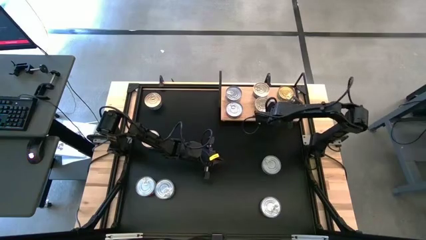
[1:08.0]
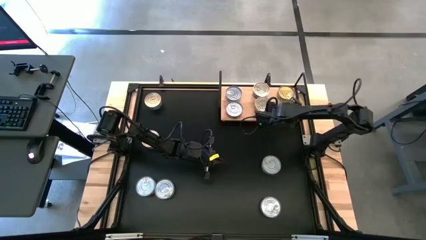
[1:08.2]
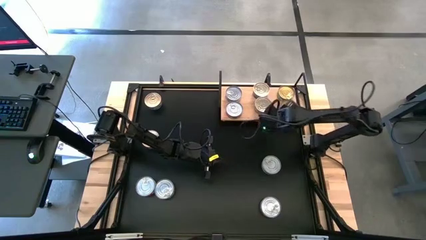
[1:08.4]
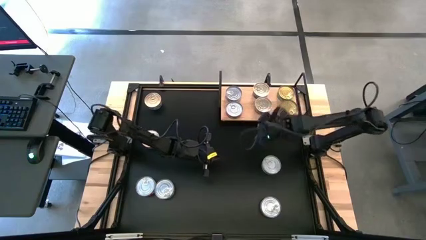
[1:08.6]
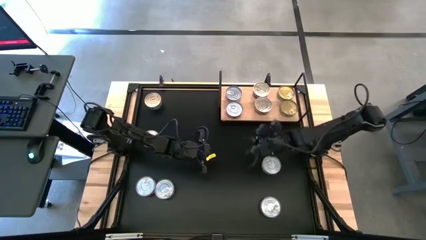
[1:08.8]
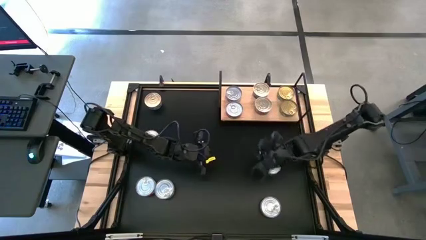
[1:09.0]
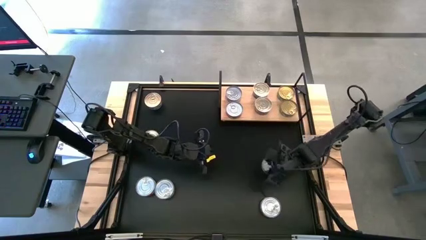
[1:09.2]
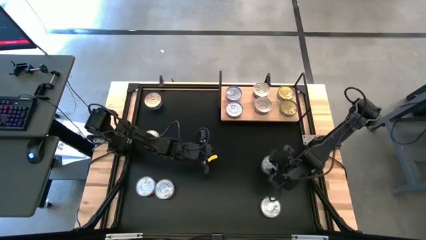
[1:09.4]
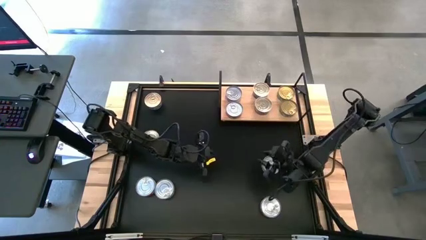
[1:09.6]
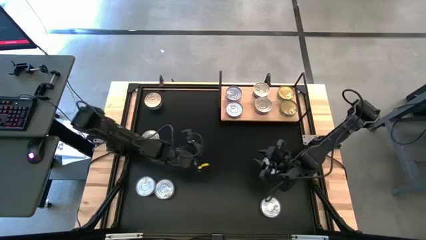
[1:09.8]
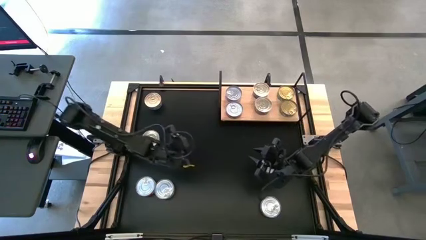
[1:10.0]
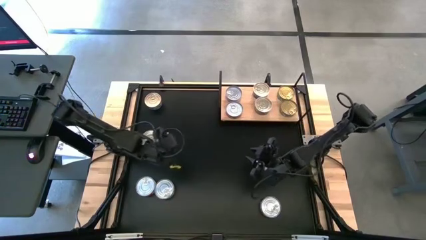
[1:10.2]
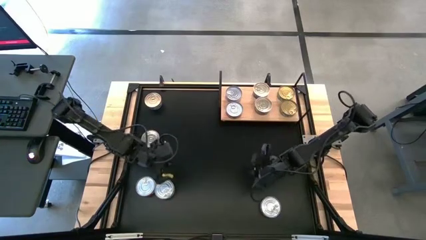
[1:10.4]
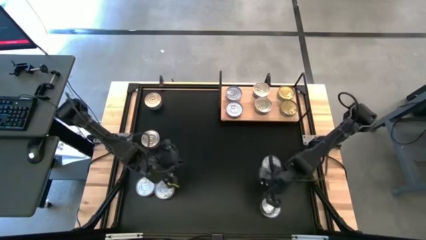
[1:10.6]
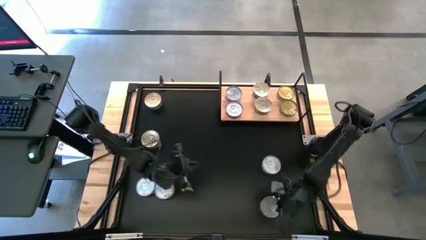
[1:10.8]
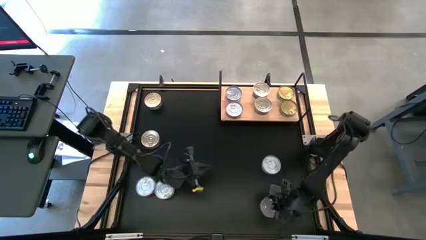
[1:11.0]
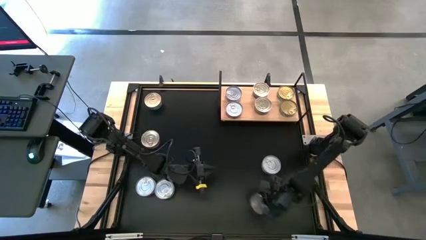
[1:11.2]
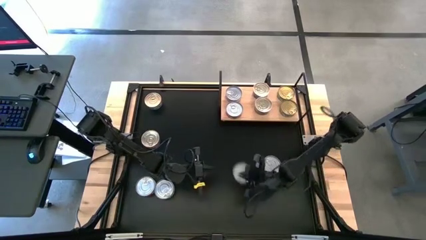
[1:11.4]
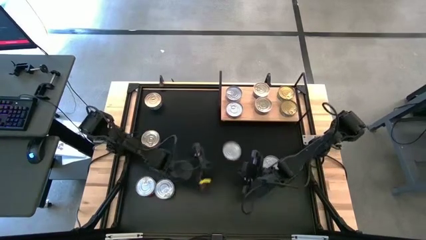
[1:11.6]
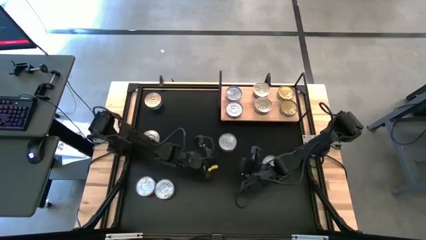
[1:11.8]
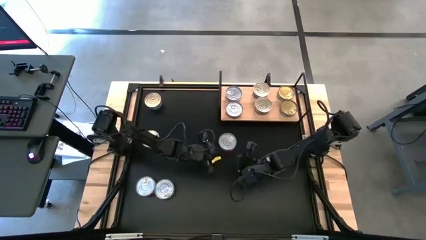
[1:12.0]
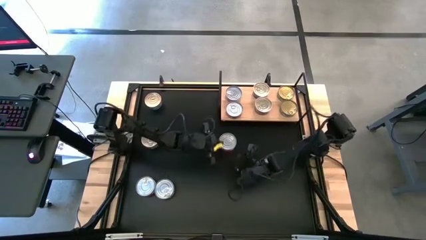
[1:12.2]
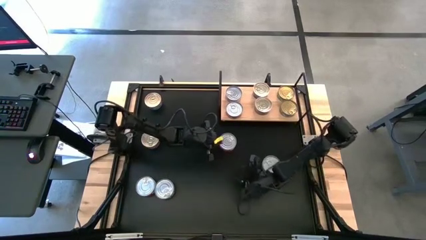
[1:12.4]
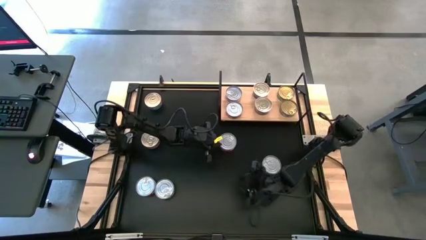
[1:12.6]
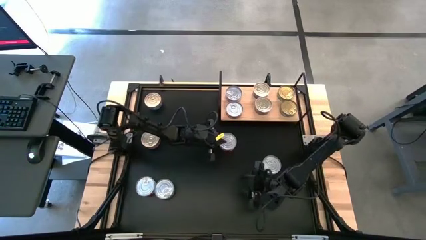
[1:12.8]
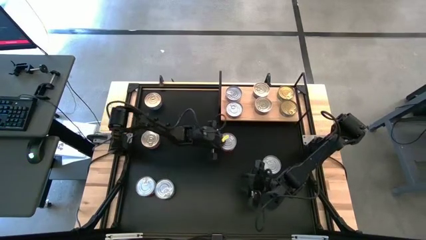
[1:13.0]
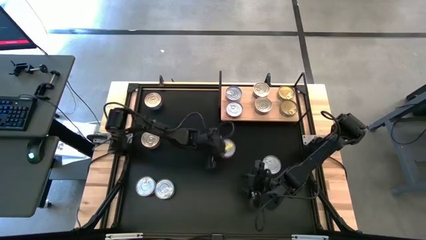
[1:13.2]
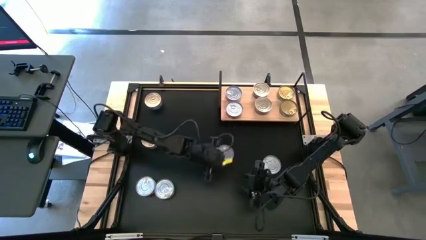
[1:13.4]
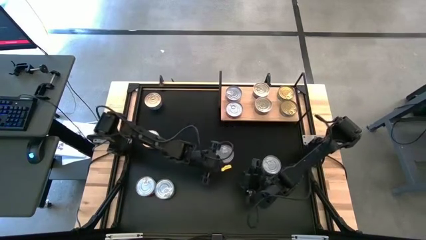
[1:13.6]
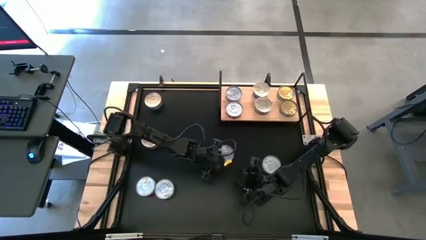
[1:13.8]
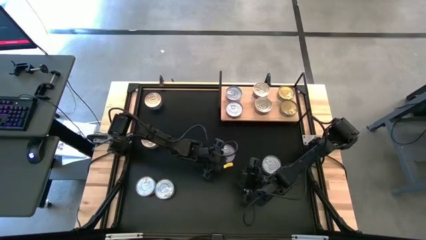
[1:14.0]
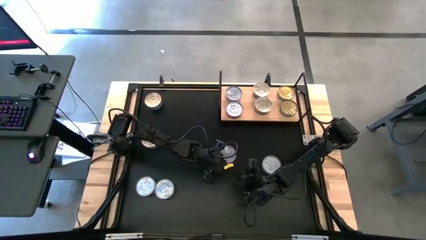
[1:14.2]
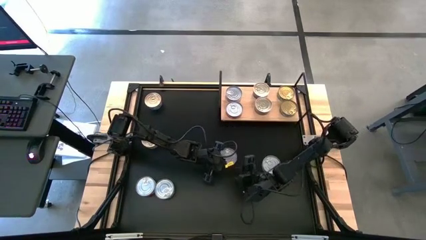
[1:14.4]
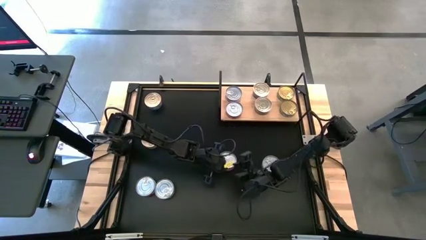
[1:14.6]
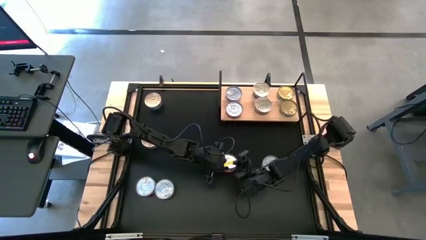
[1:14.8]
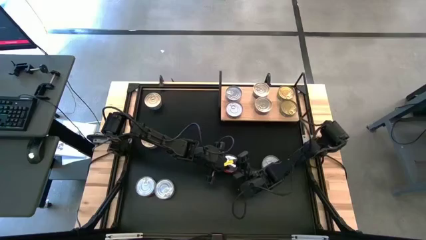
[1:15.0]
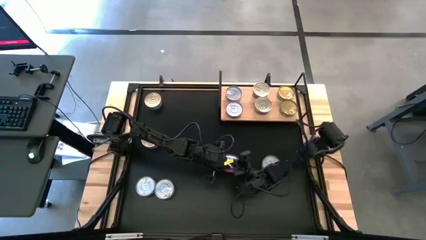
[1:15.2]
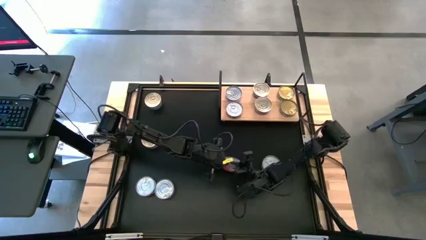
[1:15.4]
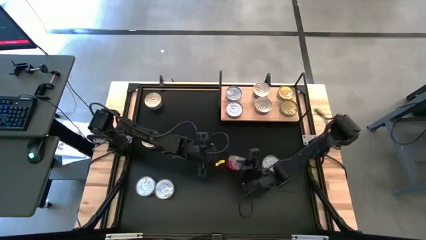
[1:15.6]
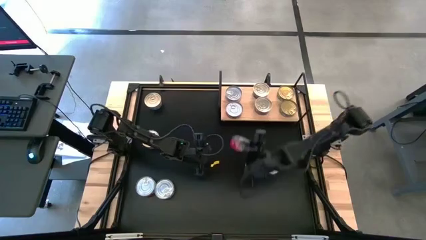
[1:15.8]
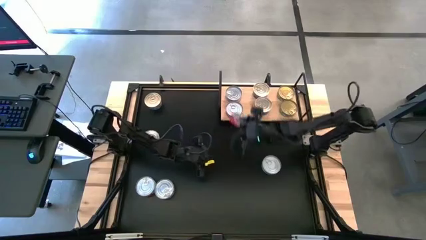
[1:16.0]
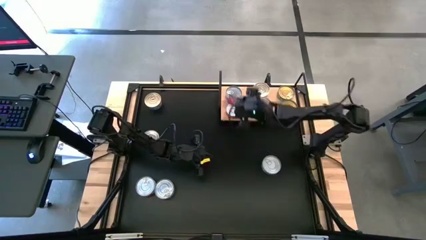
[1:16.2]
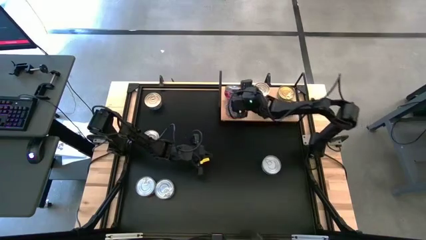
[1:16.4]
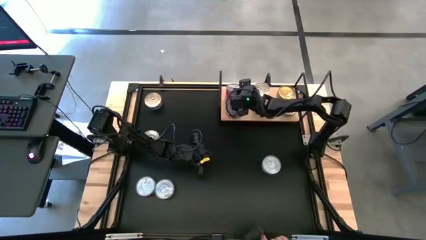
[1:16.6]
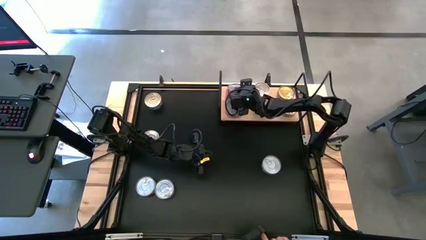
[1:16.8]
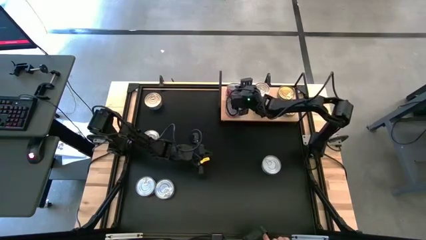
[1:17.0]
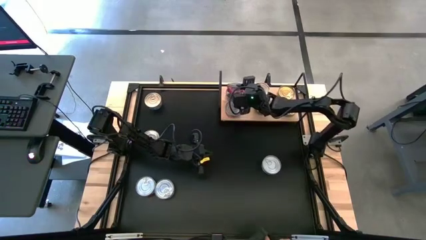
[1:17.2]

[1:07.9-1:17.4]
Task: Stack canned seafood by type on shelf
Stack the red tuna can on top of the other red tuna can on the shelf

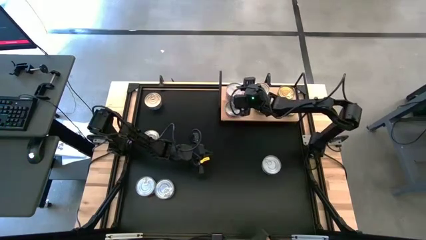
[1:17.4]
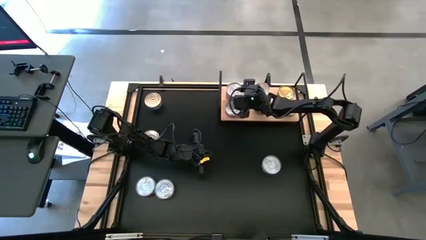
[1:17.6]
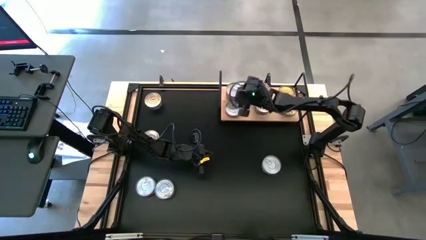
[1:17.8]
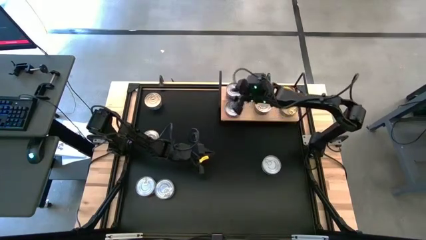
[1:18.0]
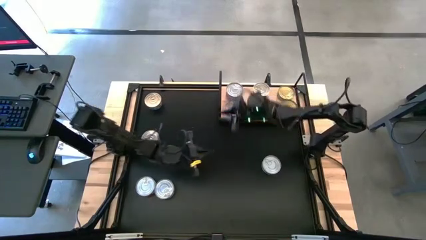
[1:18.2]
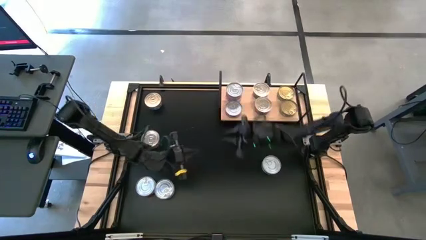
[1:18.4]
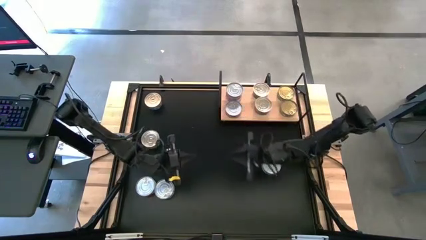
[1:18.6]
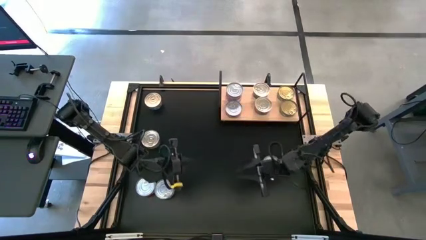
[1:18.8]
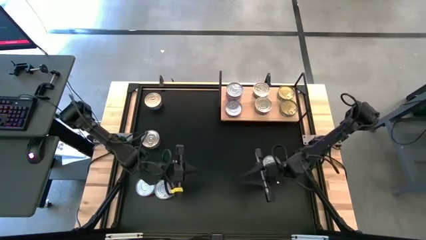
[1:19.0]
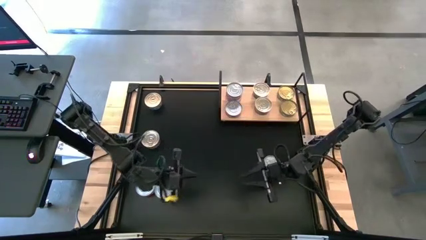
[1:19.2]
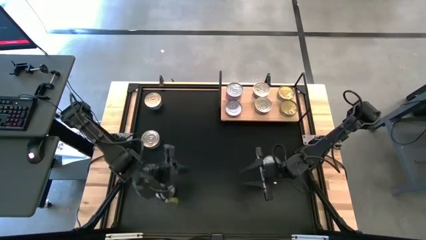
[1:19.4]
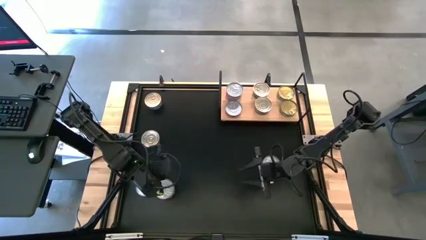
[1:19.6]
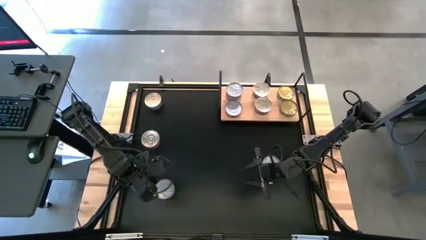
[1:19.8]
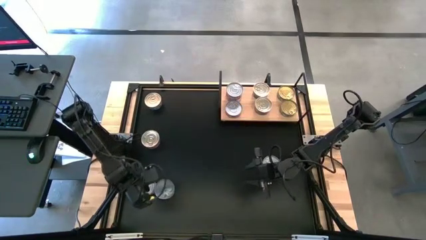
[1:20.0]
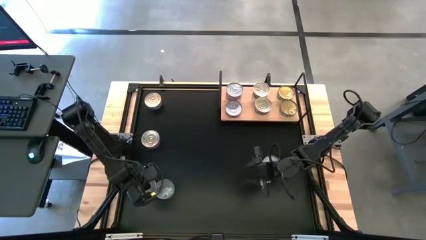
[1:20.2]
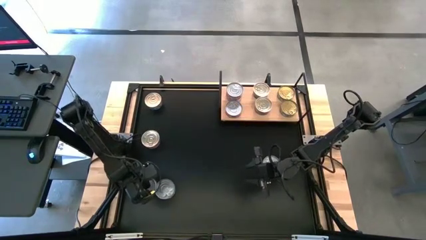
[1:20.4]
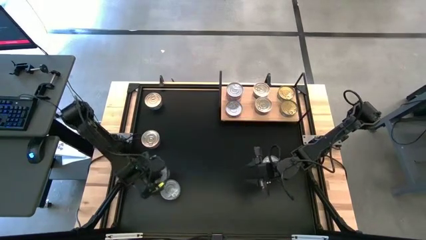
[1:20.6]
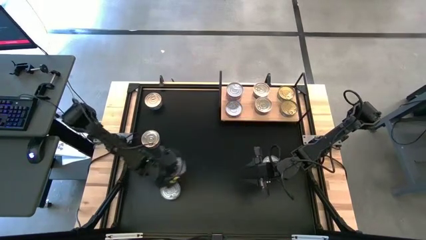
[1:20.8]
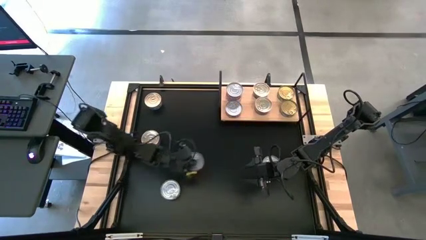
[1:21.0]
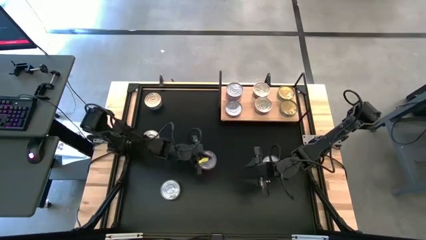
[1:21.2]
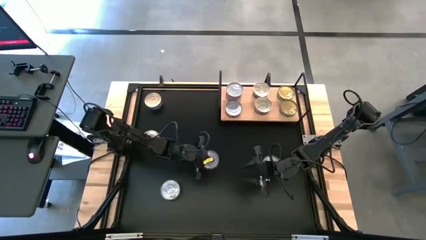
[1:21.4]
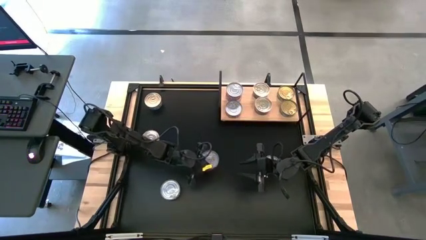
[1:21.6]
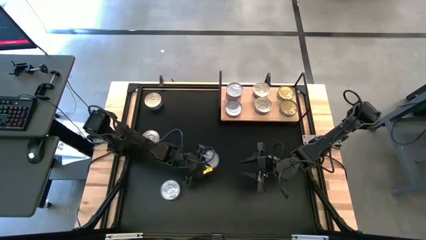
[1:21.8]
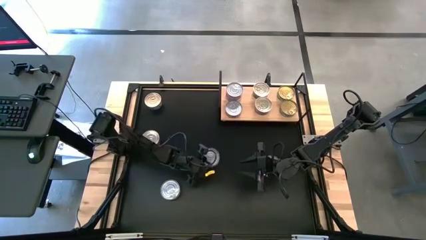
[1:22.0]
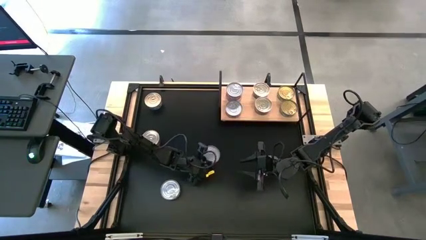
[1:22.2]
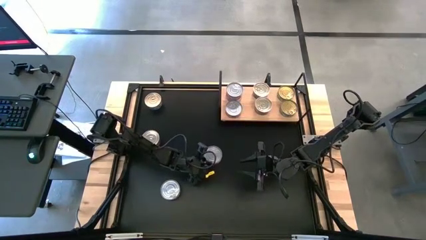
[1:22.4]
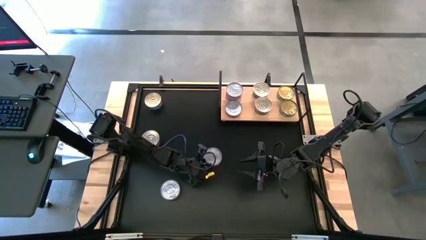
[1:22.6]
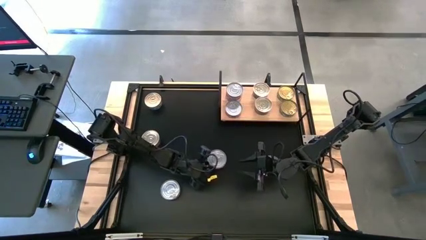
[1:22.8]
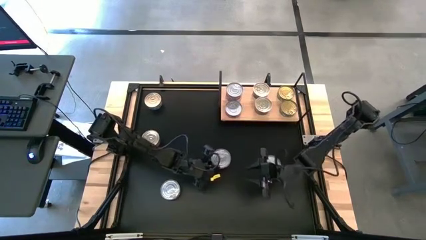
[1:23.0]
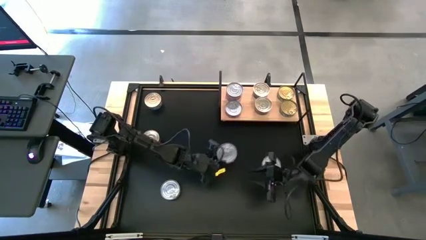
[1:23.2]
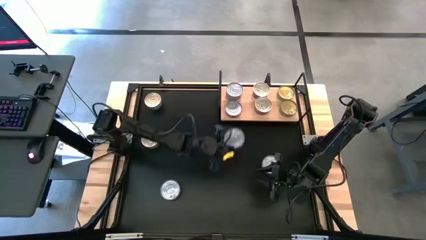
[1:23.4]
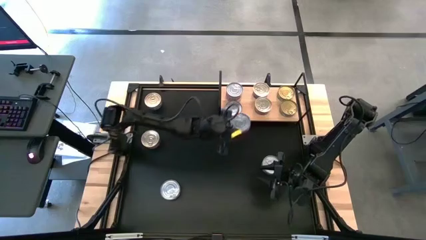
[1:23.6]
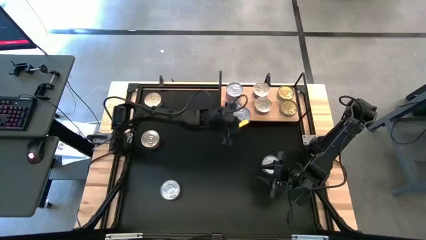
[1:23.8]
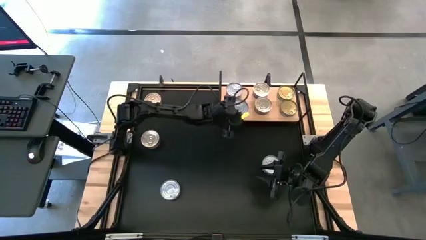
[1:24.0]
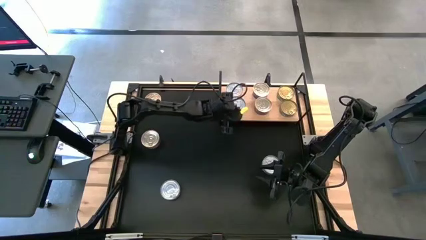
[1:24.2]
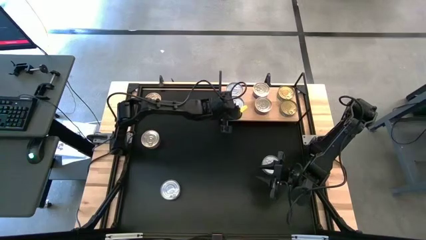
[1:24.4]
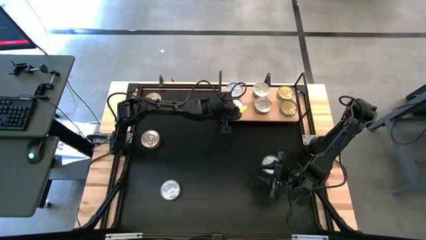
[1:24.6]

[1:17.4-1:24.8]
Stack the red tuna can on top of the other red tuna can on the shelf
